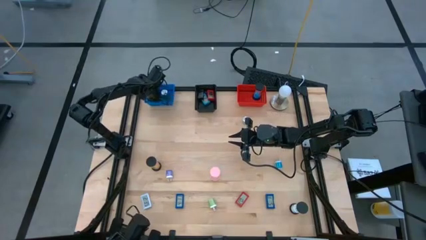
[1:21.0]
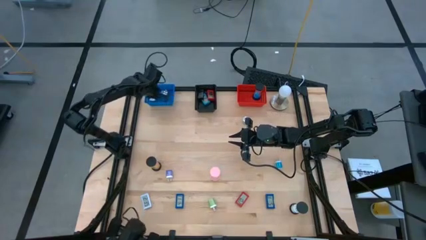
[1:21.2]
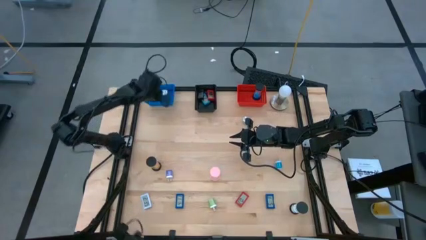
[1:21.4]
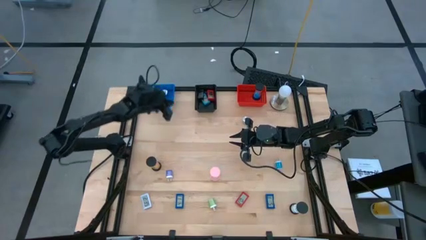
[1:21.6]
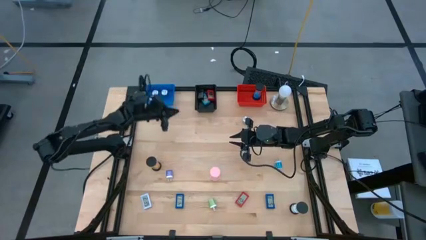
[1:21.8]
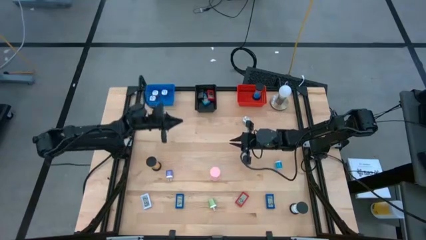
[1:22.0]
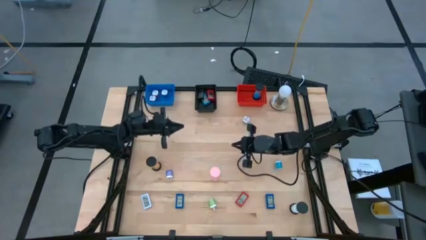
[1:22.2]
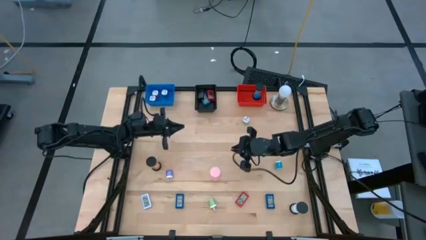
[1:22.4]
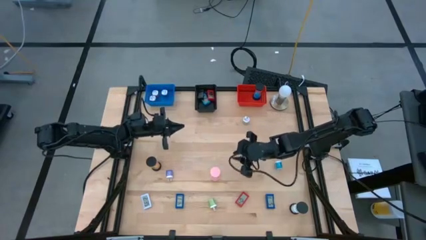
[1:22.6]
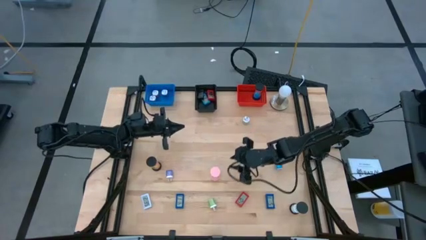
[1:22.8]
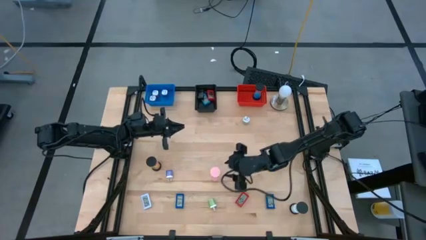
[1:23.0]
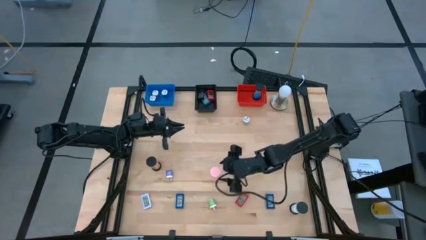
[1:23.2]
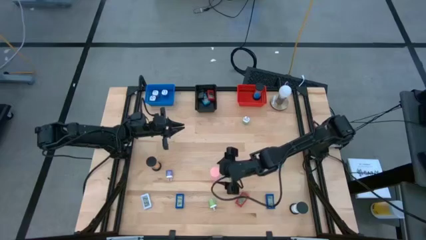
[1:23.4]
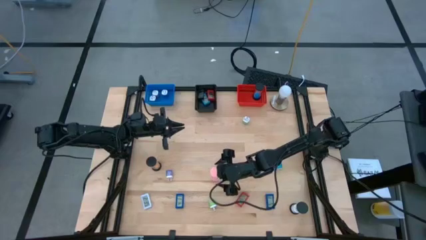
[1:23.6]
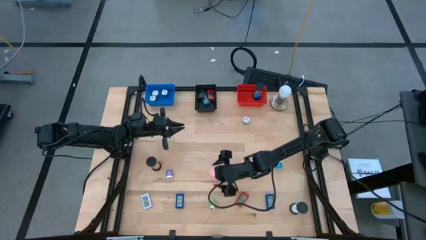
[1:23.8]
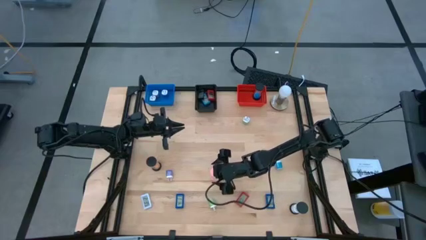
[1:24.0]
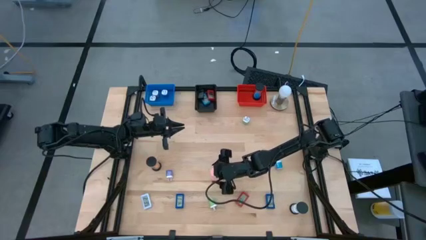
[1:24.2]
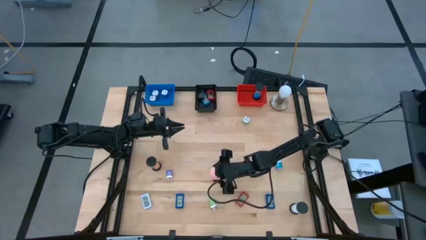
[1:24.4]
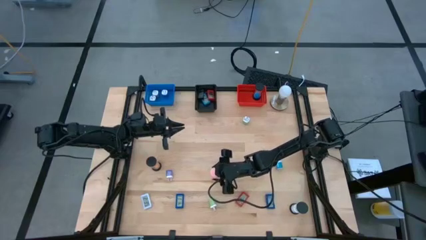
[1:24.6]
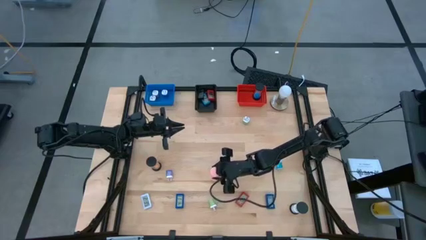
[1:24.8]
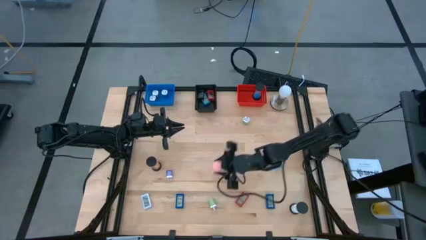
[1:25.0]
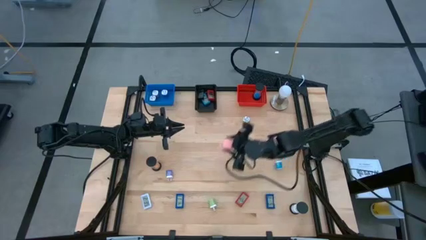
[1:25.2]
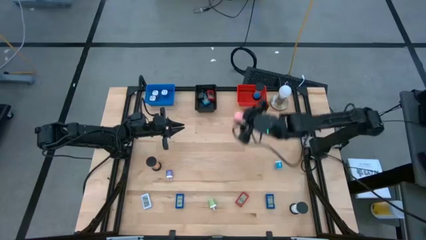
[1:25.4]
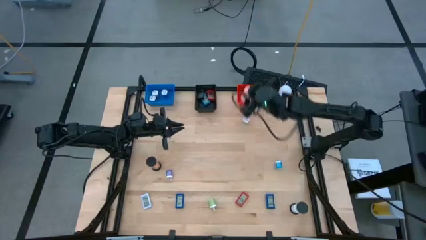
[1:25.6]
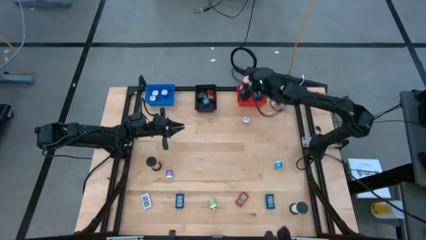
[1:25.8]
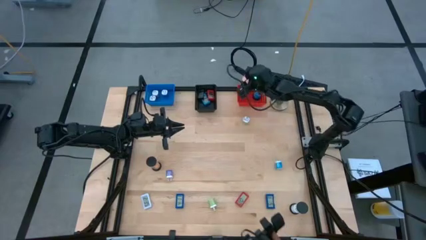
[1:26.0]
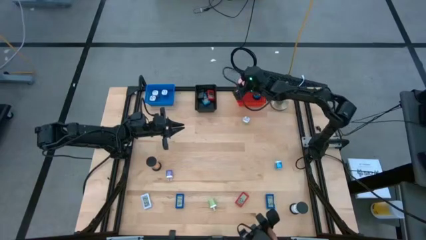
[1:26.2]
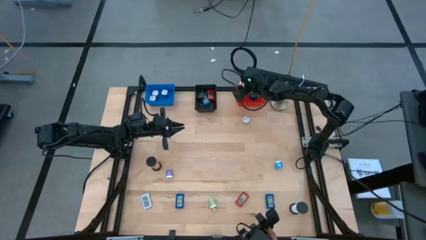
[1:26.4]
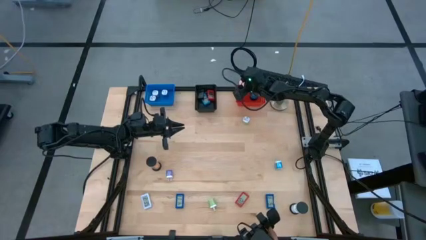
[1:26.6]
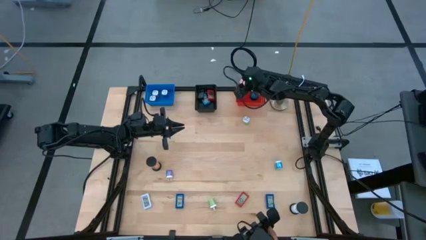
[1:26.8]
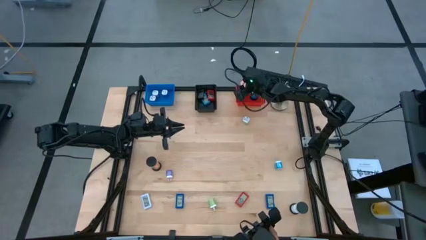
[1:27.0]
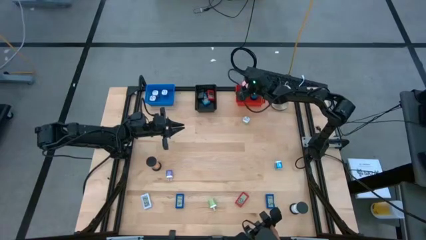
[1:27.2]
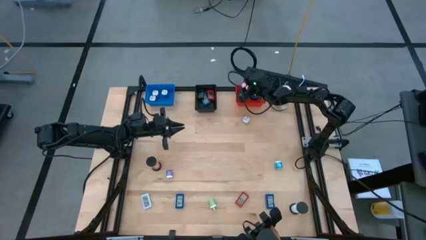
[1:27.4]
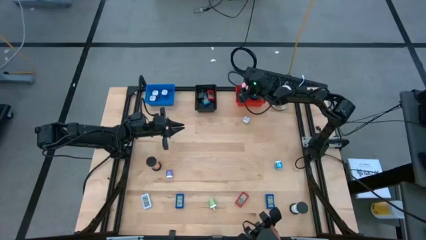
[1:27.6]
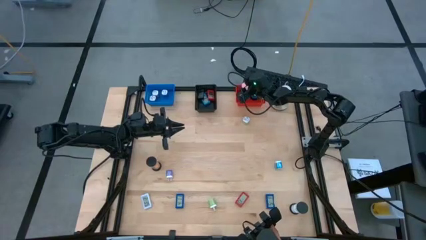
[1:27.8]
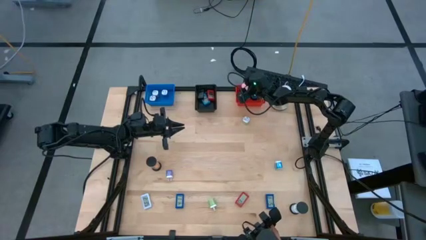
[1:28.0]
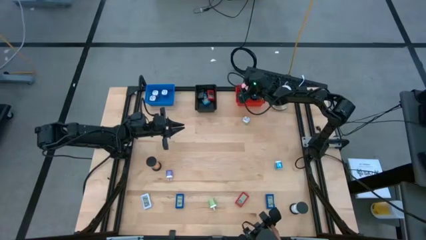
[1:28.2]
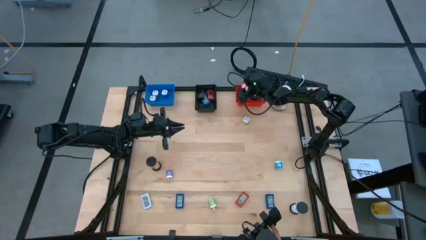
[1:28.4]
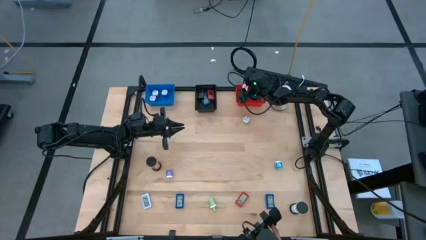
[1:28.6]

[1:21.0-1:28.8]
Task: Pick & Place Office items
Put the pink hourglass into the red bin

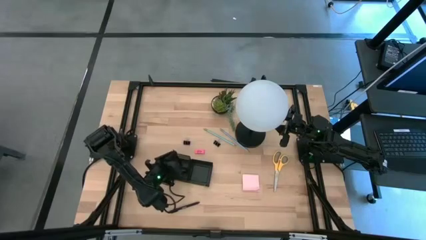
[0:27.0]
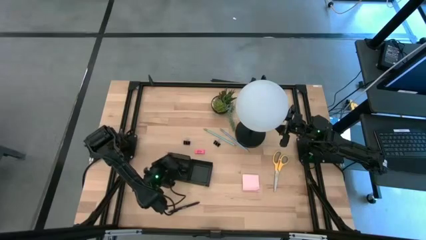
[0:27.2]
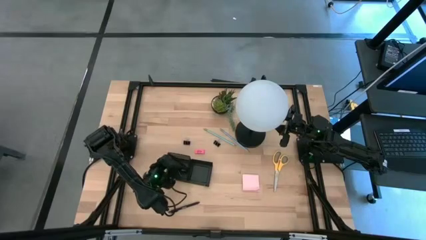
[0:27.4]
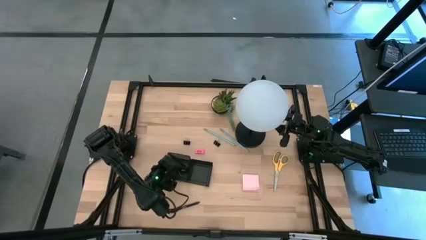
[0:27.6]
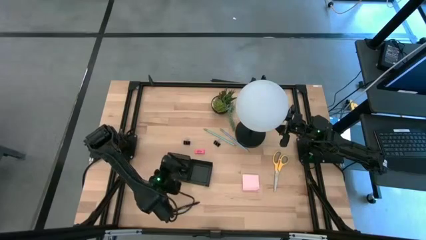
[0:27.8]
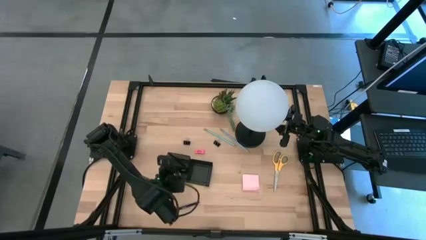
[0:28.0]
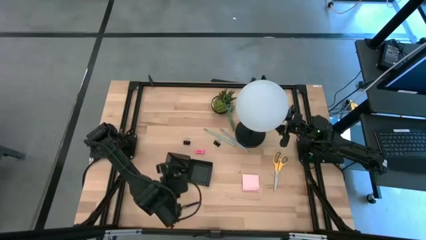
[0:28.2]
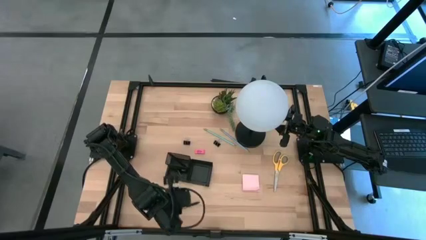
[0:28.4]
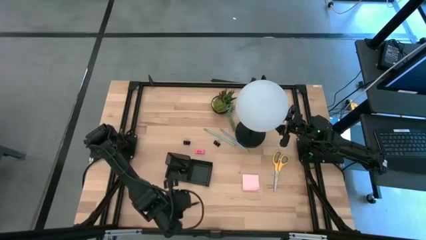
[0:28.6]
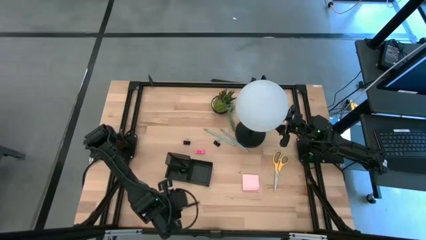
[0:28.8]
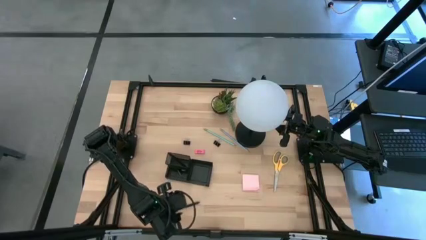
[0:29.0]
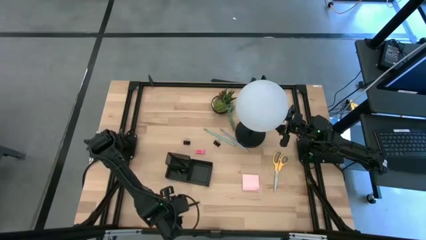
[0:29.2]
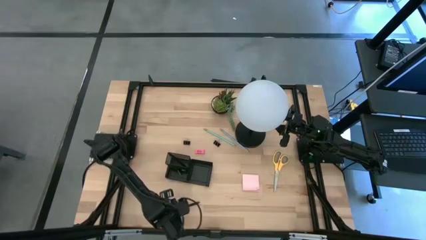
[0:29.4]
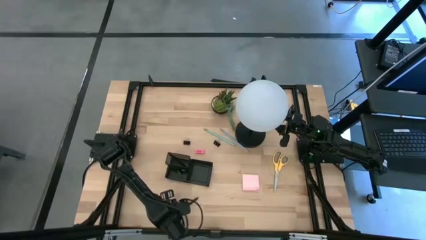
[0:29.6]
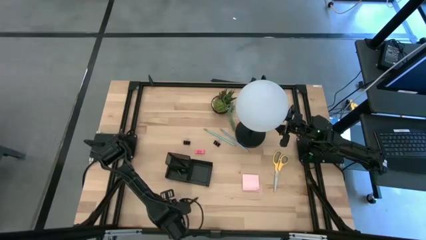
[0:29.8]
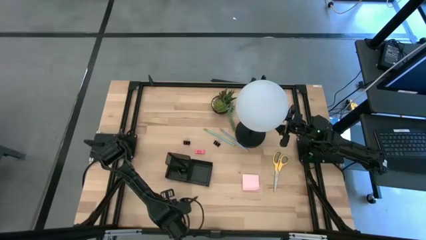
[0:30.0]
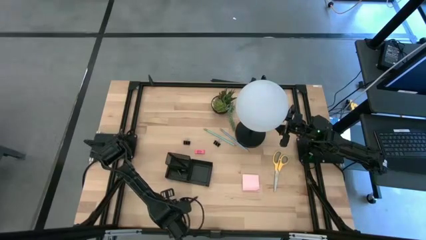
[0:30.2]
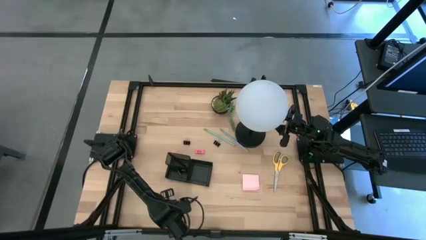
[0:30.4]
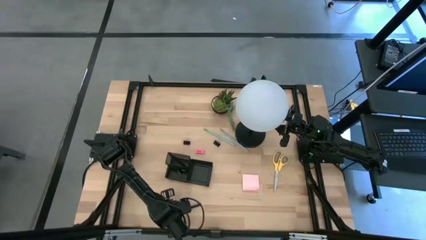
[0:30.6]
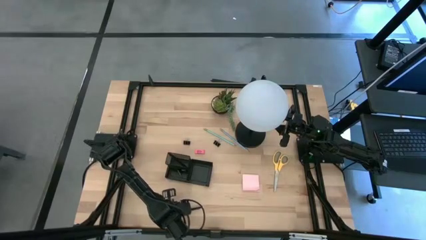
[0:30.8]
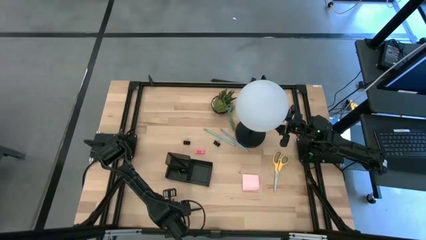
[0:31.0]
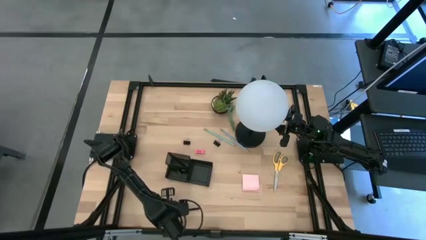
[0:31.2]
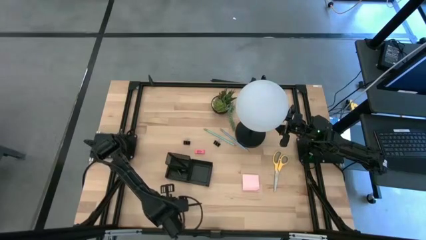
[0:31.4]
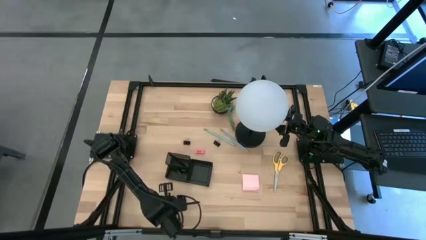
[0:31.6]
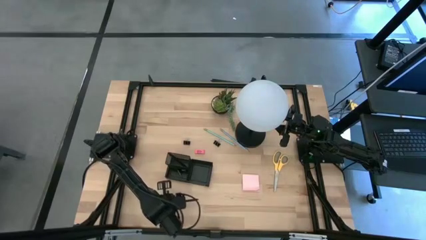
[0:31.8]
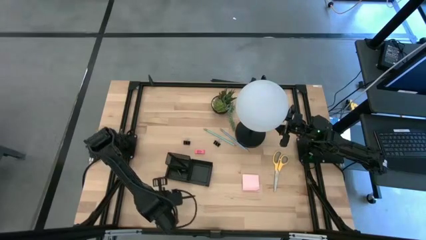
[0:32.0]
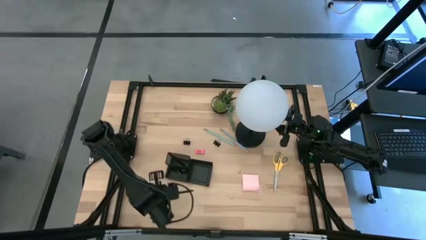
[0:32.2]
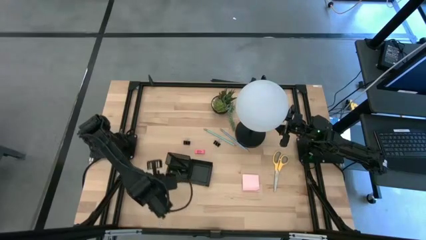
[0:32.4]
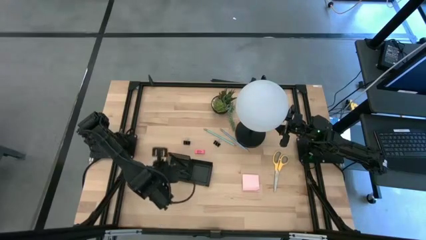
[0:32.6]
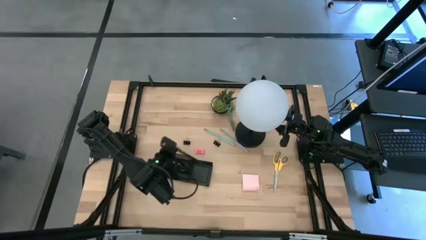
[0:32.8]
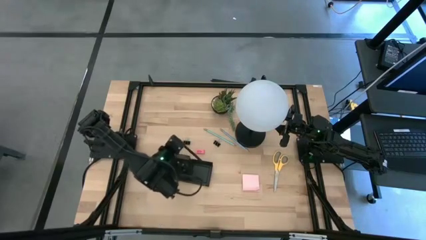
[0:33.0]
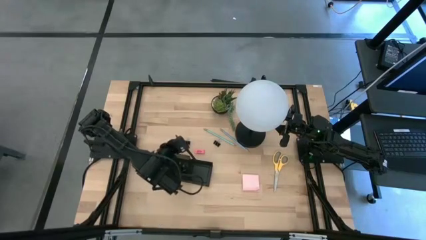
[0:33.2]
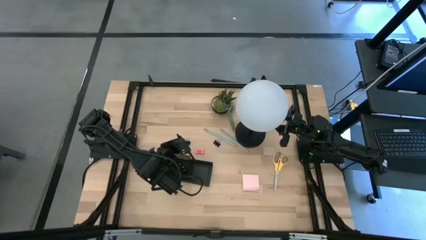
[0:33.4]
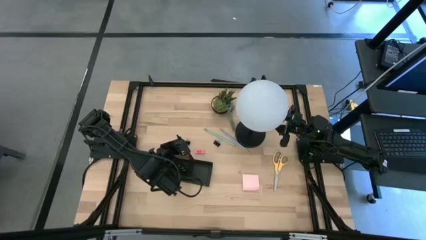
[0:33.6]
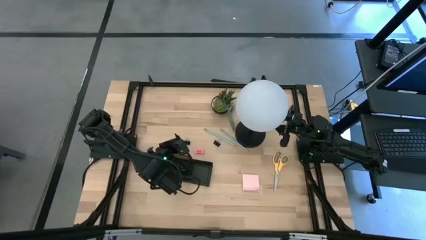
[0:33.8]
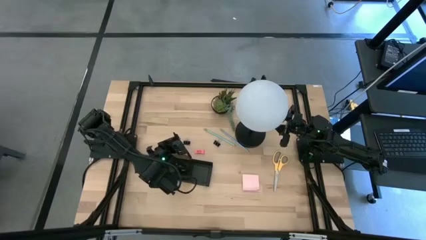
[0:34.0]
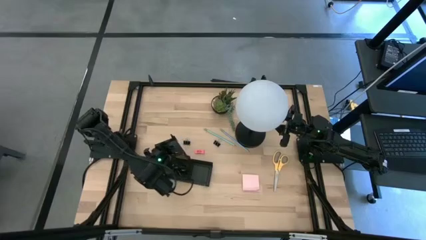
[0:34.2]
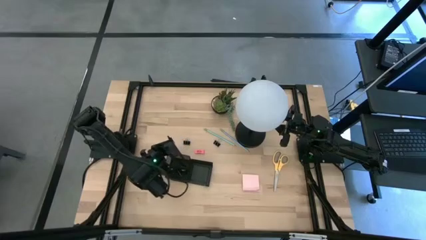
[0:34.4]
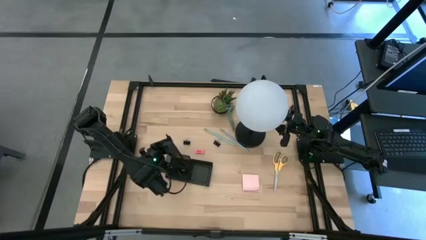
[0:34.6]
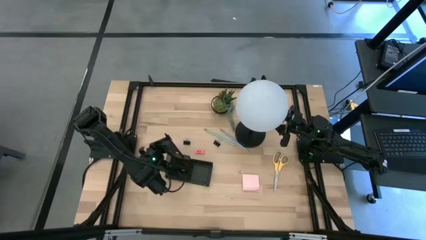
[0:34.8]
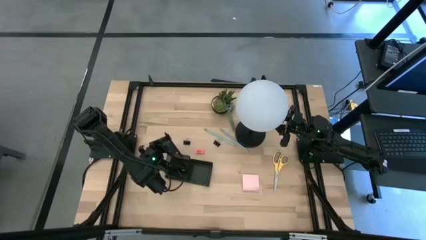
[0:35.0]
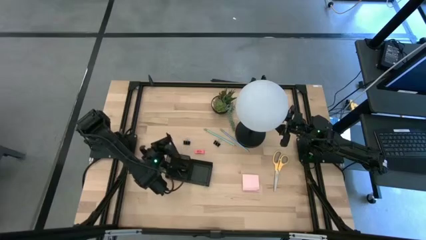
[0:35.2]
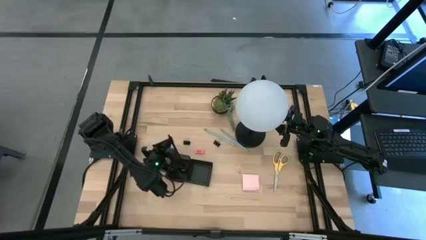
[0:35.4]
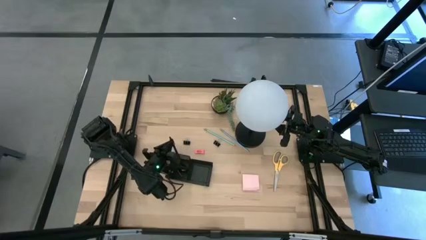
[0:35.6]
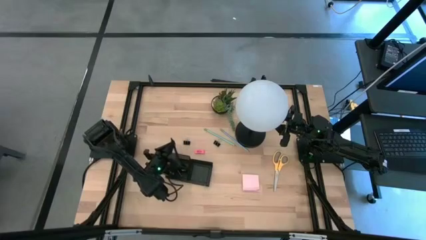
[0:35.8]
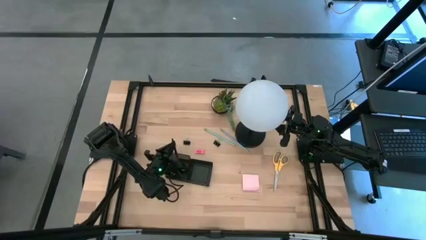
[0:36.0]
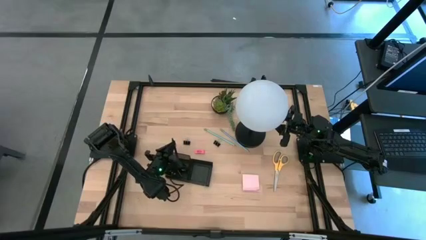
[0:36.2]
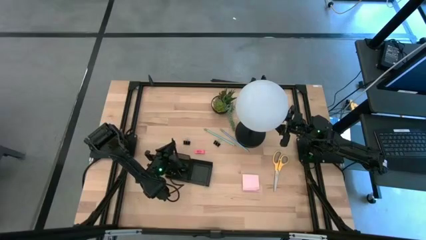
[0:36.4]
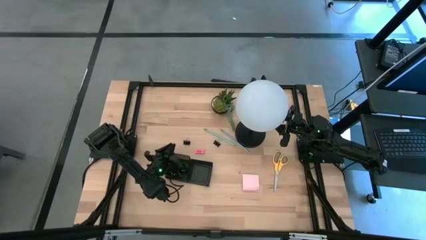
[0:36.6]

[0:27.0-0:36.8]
Task: Pick and place office supplies into organizer
Put the black pen into the desk organizer
